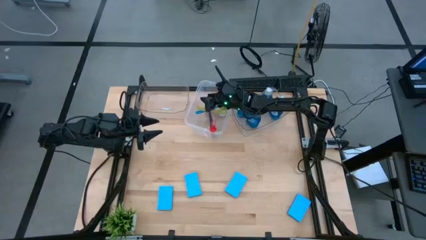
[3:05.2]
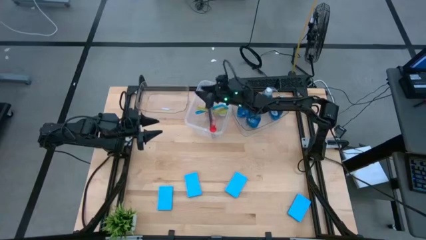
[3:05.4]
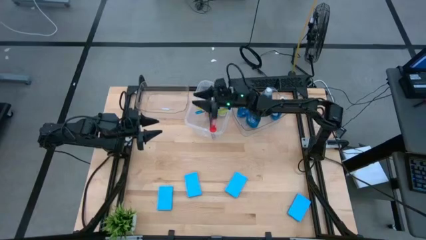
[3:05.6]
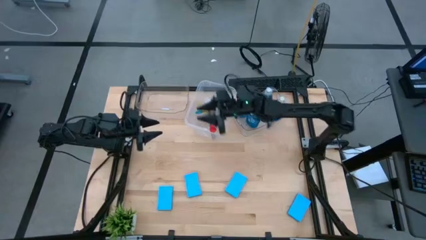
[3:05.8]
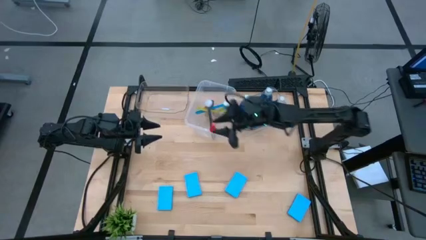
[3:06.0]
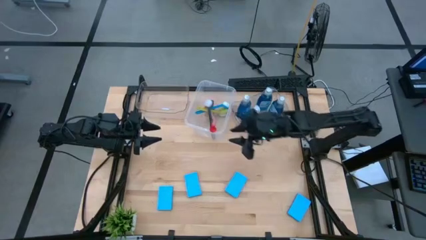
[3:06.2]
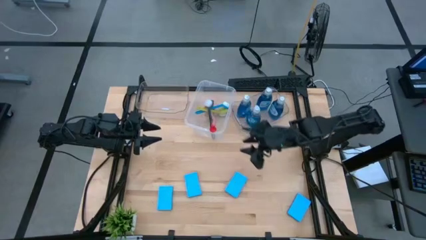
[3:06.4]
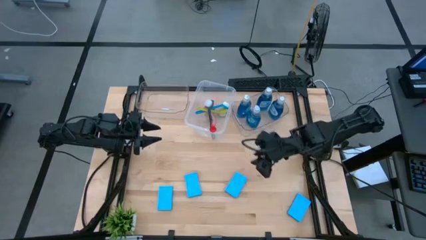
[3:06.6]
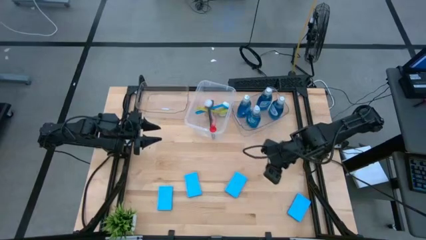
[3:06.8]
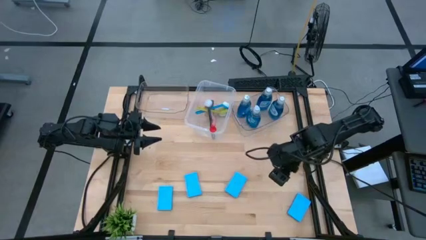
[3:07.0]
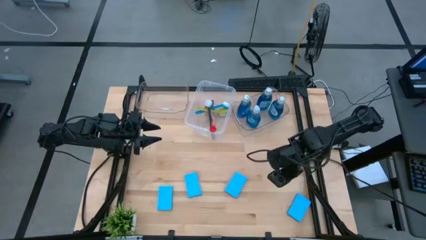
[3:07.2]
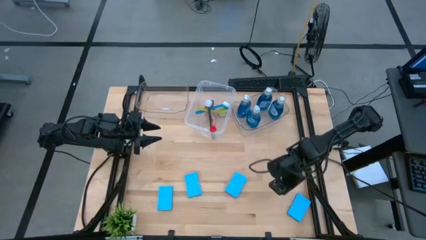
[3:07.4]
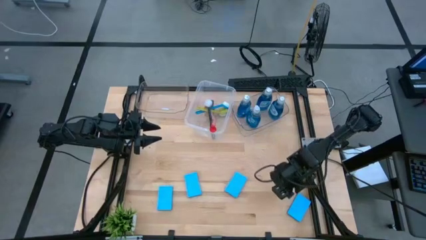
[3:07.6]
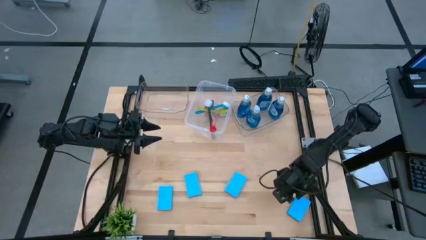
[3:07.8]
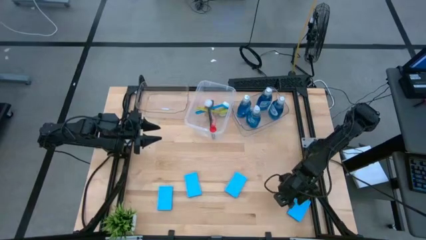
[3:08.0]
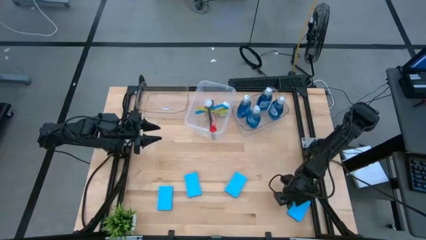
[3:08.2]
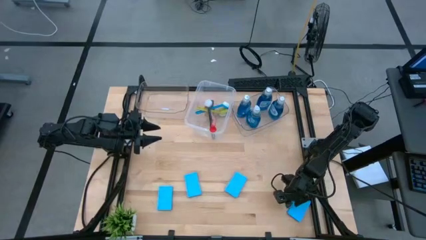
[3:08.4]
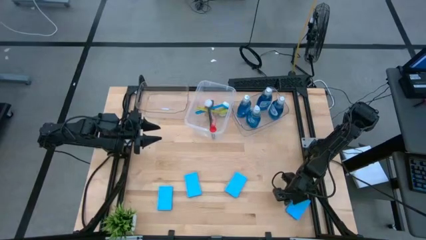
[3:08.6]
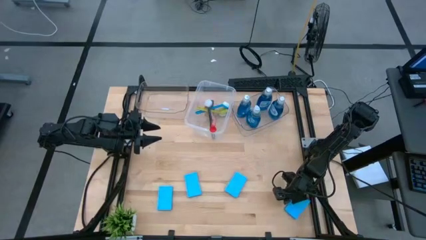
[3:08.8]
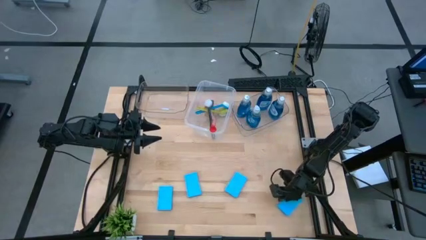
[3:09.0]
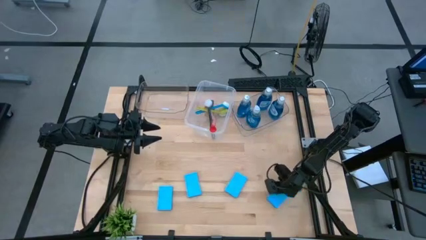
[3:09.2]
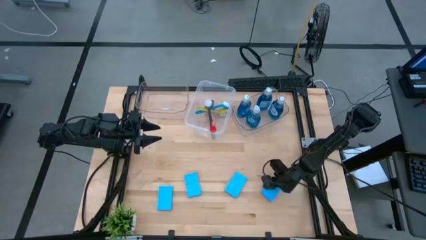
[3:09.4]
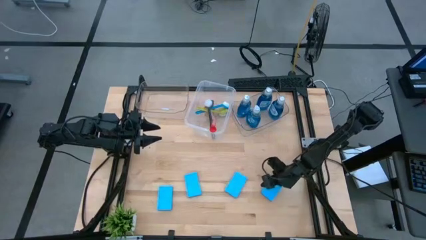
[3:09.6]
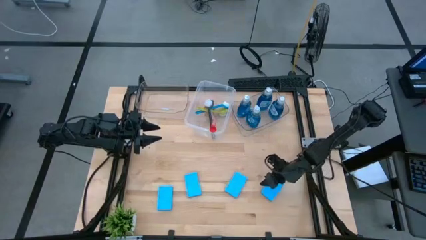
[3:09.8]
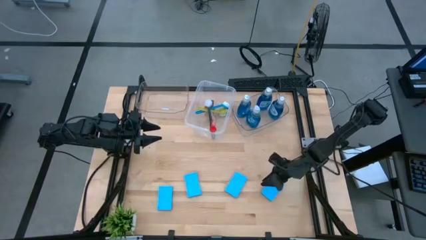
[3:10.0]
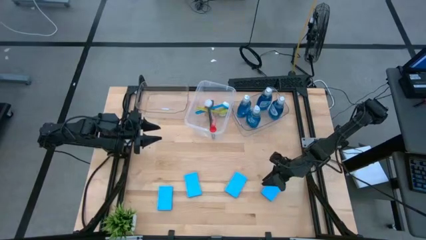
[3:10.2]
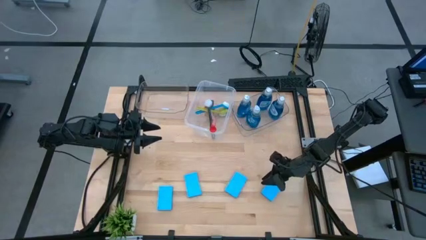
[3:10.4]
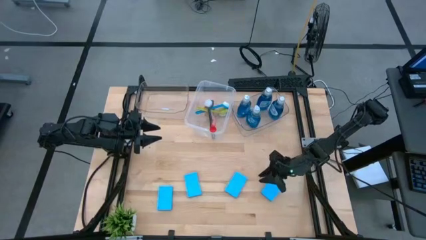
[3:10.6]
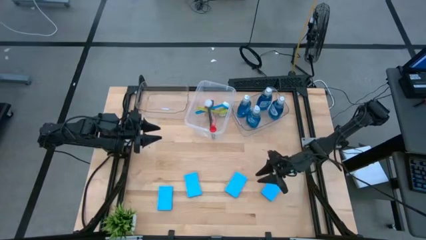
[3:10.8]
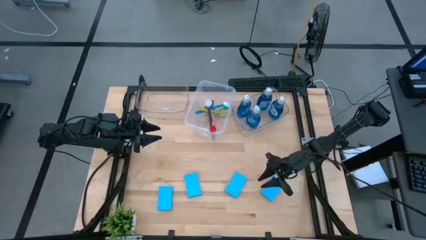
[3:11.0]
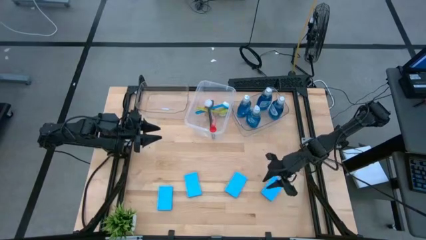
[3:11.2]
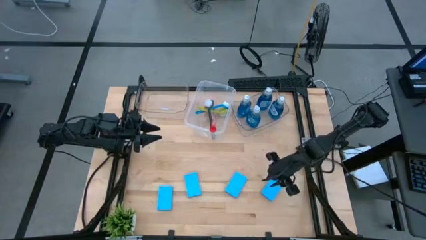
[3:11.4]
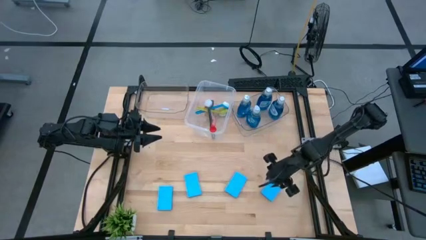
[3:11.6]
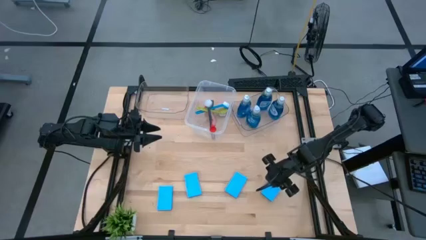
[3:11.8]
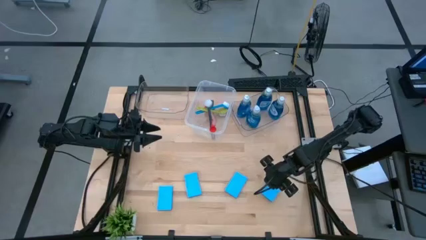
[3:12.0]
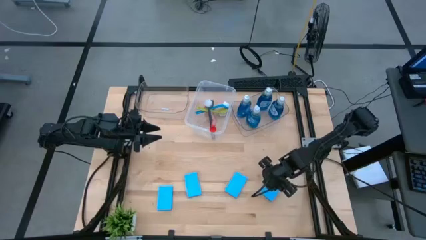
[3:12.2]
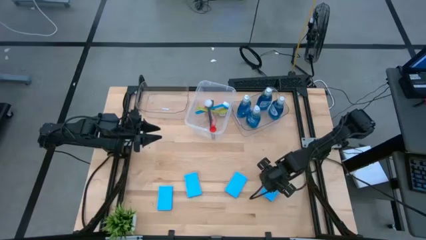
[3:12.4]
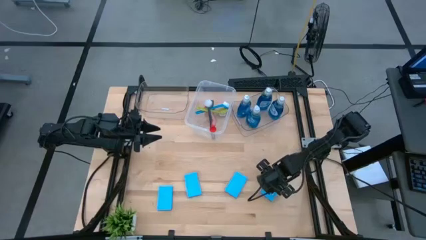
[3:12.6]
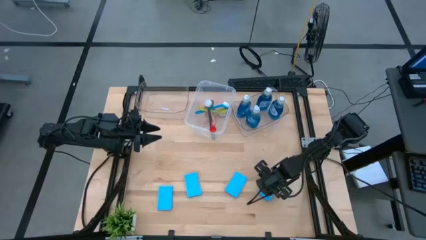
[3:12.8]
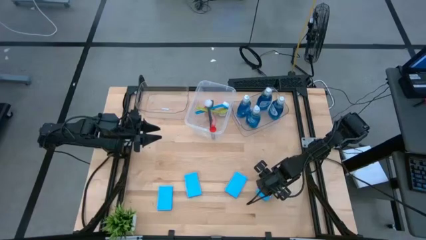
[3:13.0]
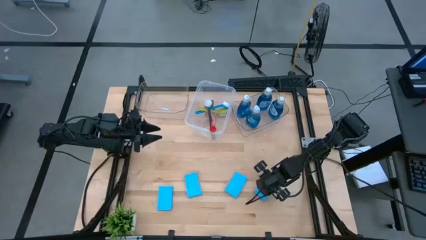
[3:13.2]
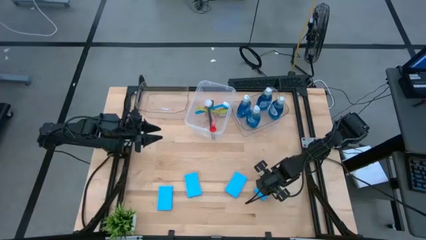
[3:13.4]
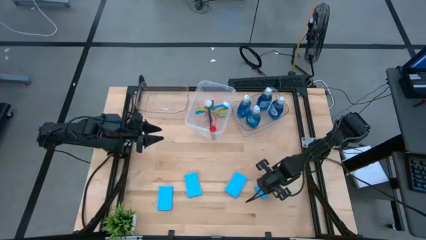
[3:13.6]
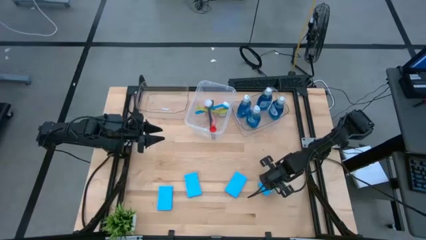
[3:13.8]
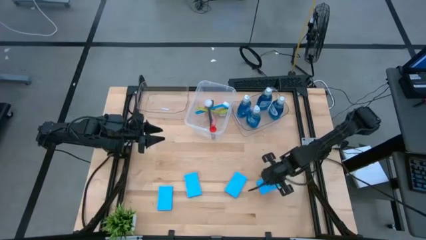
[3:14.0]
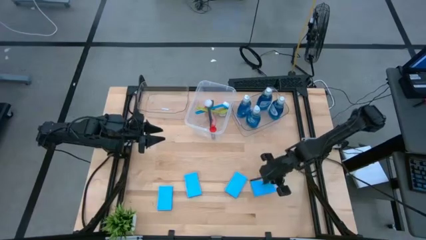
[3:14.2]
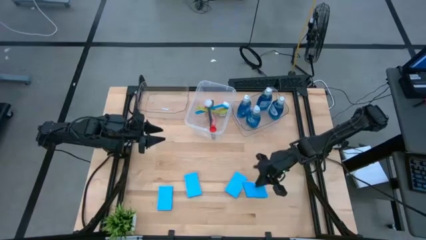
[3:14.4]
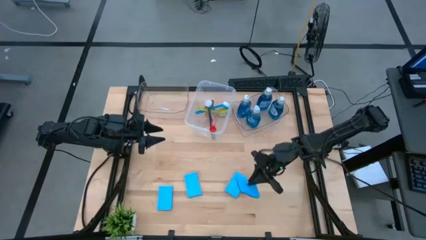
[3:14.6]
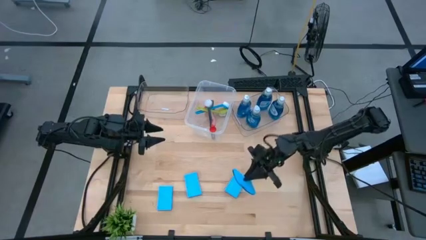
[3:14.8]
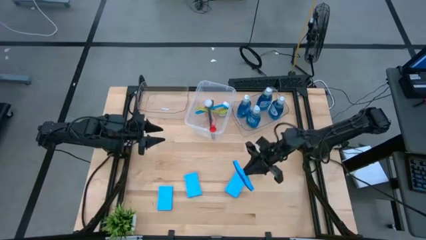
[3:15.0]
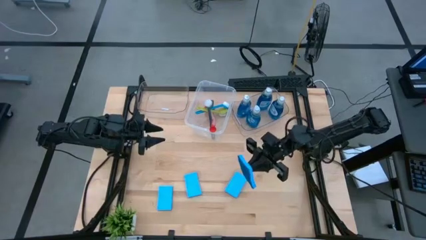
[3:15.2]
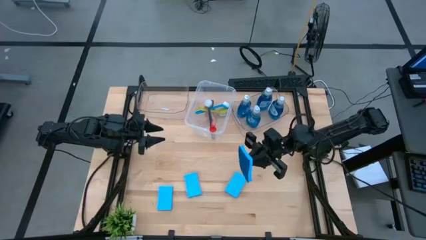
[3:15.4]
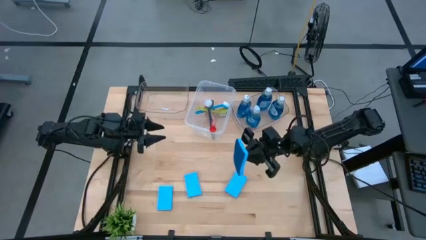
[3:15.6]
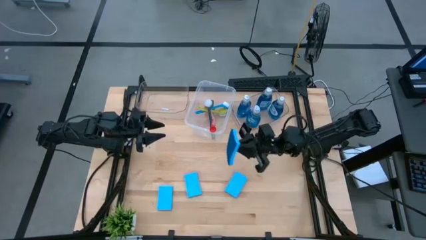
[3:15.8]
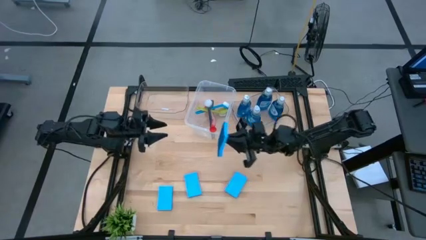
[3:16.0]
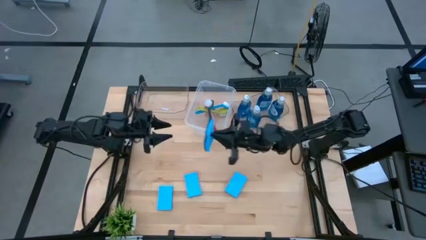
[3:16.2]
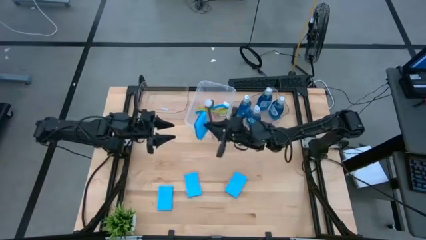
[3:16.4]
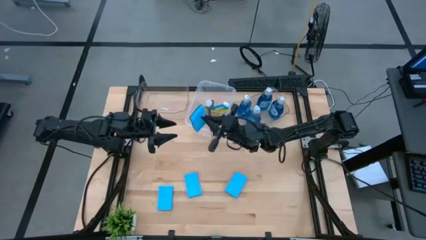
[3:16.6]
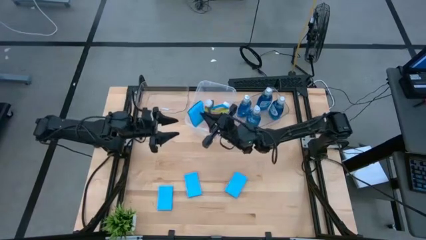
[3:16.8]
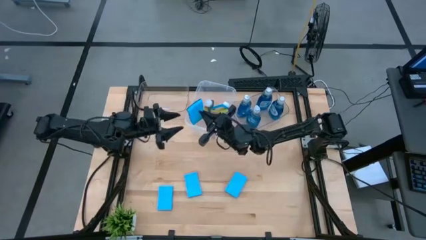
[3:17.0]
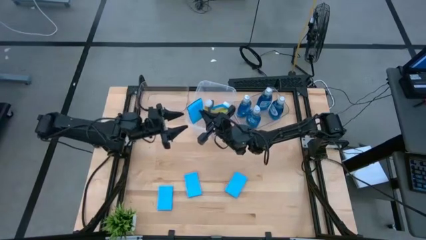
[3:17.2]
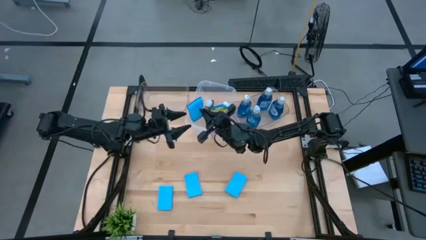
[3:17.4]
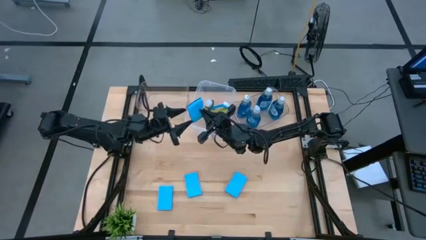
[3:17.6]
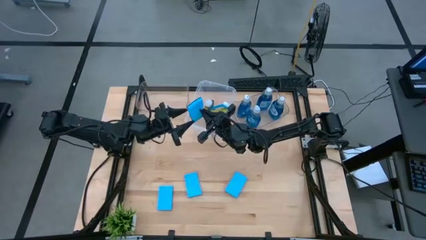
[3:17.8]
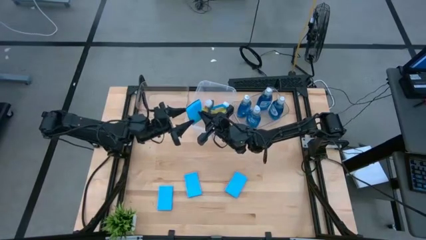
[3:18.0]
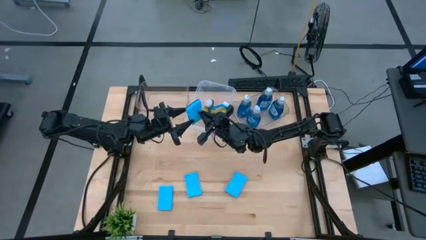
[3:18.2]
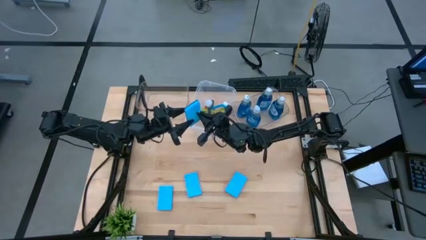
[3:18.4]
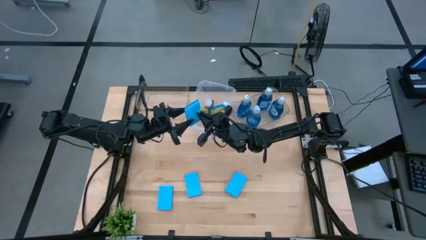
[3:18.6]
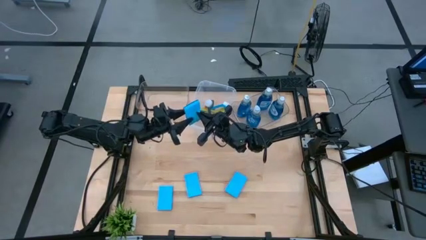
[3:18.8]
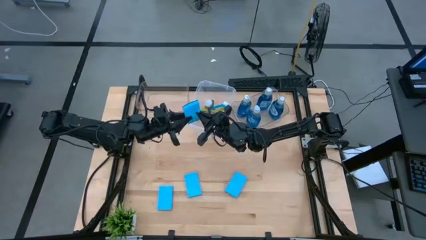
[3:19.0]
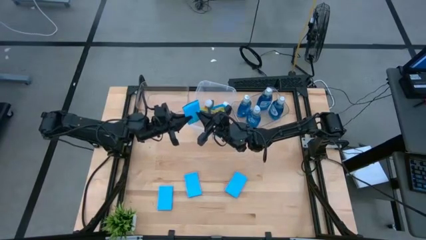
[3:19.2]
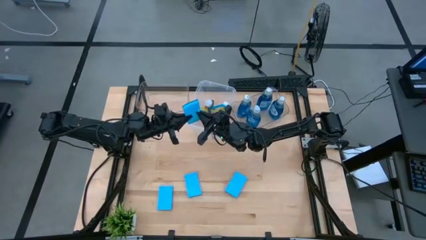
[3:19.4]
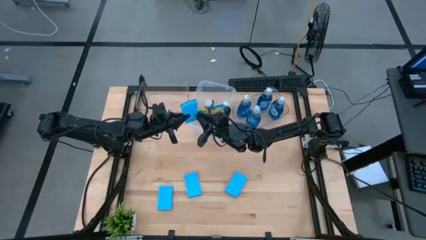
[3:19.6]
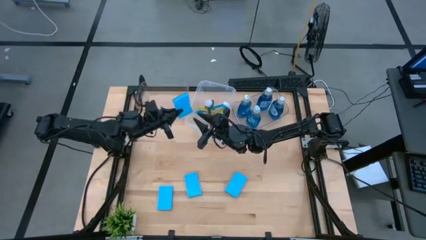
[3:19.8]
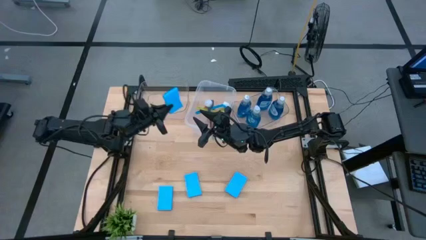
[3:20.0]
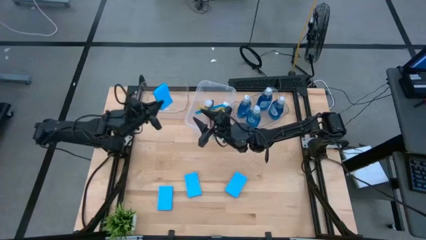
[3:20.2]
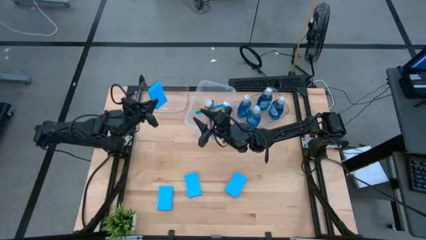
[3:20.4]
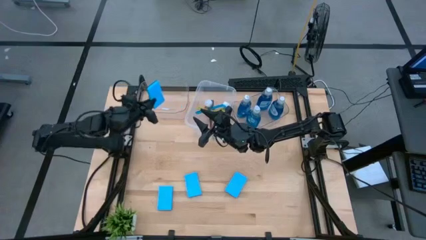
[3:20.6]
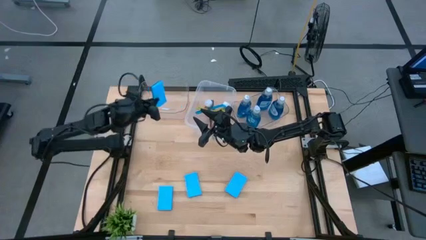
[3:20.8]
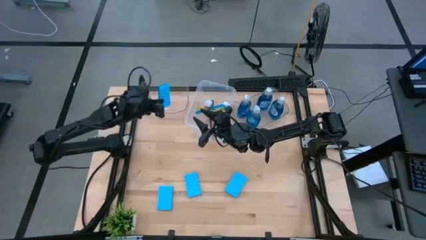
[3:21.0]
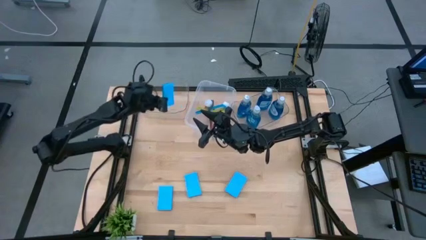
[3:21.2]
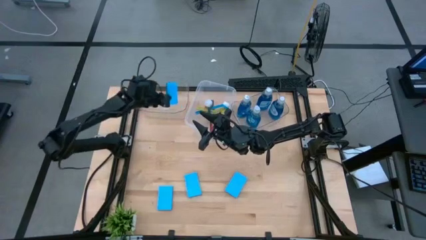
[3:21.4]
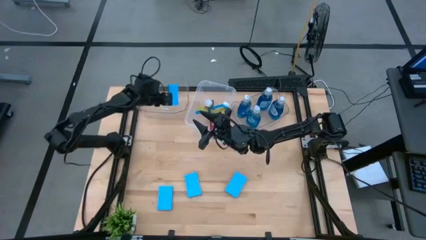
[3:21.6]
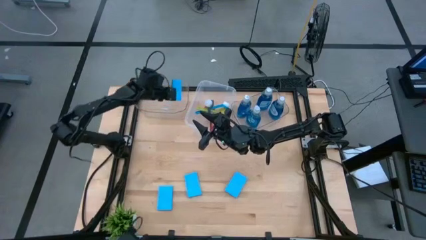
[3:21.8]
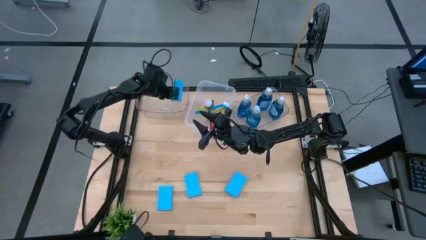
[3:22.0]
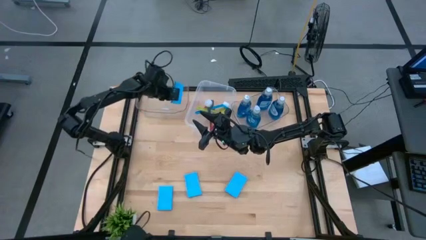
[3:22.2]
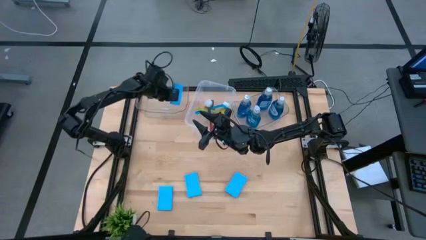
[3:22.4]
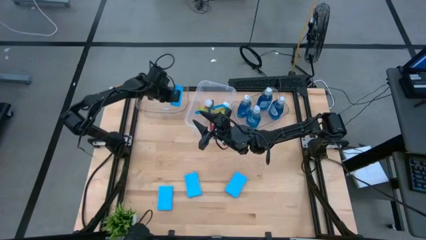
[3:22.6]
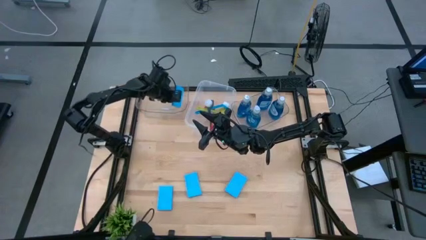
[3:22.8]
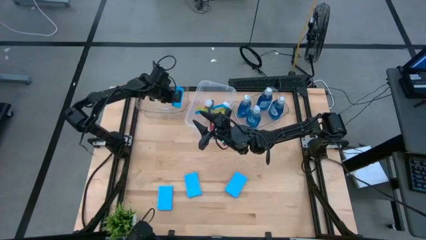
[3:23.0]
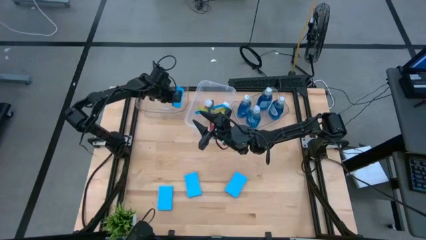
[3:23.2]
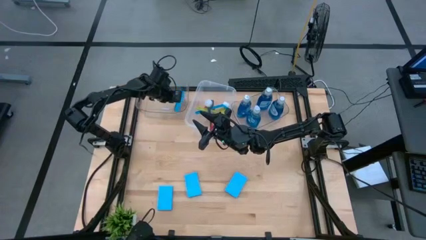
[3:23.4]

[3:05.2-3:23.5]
Task: Pick & Place Kitchen Sink Supplies
Put the blue sponge into the left transparent bin
